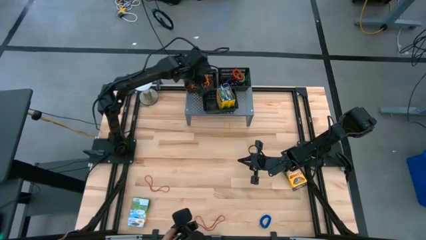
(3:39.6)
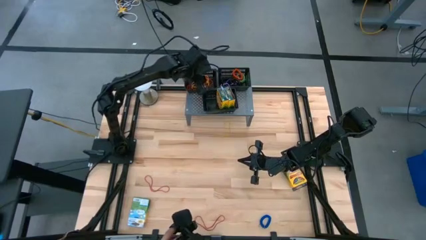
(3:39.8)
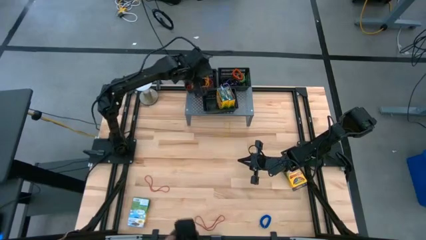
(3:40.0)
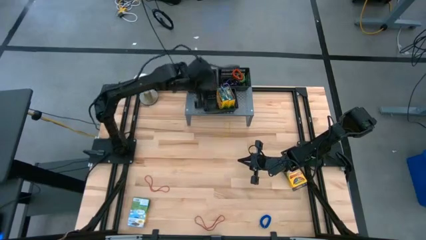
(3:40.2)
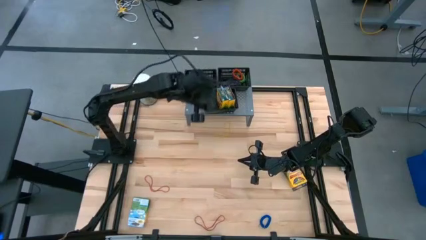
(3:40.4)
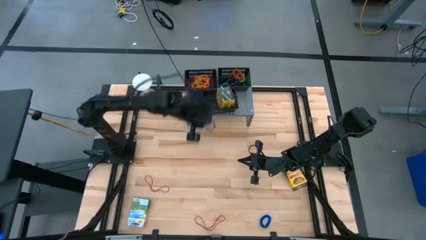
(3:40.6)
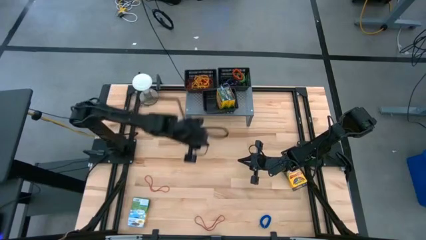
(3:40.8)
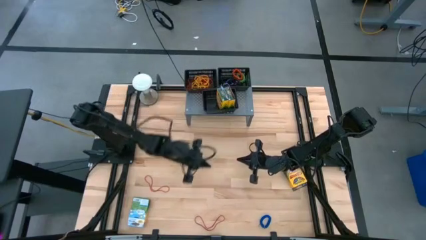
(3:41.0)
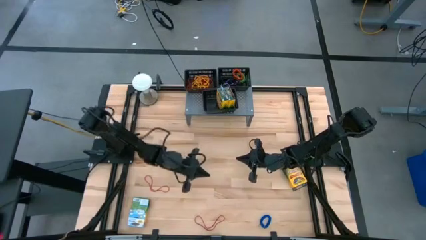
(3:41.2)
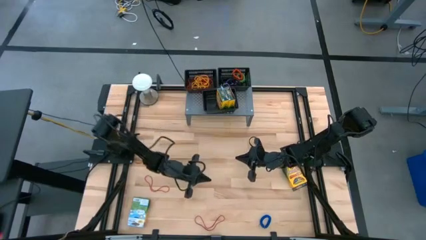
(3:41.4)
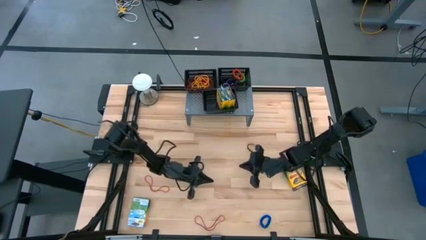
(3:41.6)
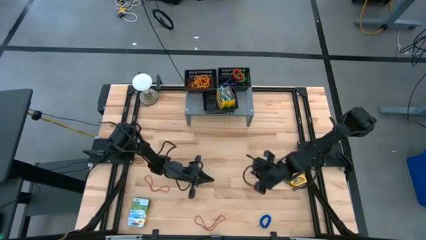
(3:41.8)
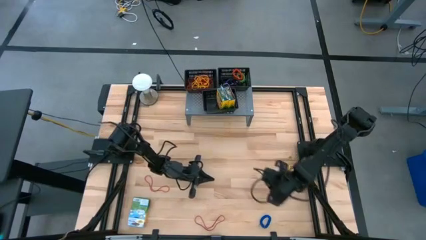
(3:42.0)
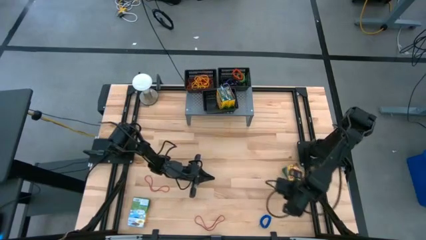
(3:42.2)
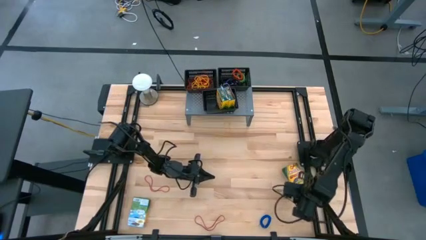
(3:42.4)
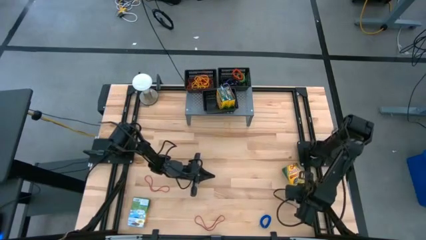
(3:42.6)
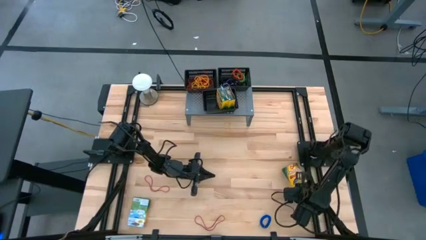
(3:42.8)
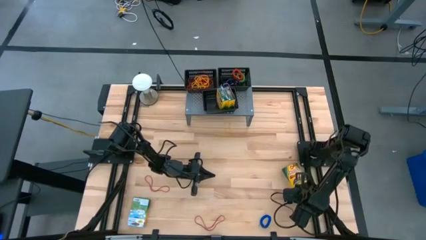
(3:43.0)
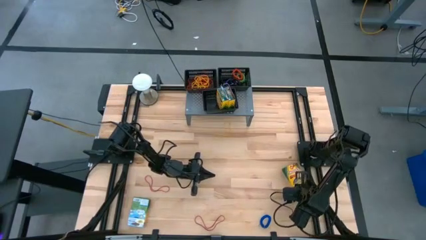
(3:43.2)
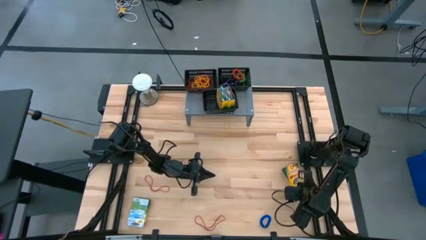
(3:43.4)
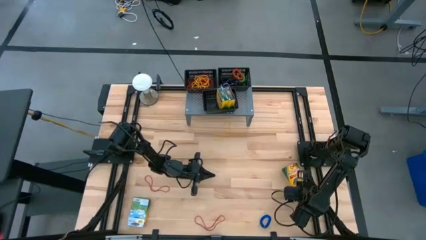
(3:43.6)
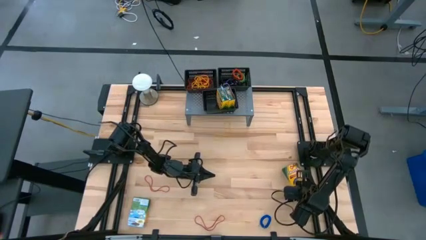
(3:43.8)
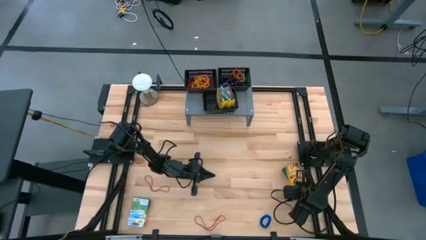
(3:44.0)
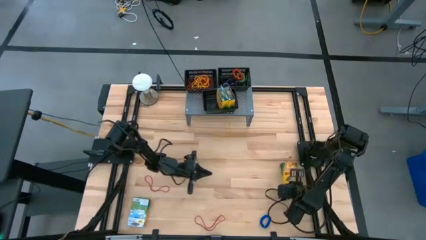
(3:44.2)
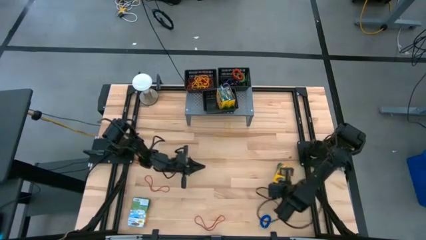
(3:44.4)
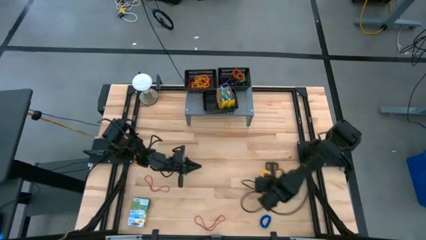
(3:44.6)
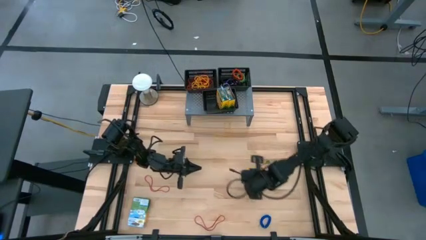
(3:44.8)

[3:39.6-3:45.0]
Task: Pick & Place Office Desk Supplies
Put the crayon box into the bottom black basket on the shelf

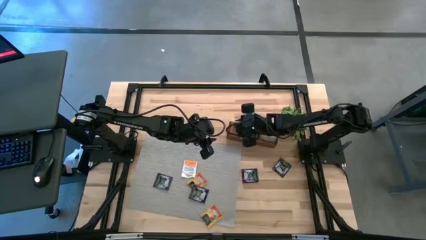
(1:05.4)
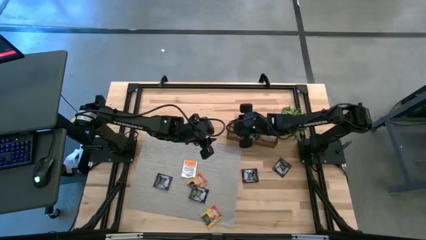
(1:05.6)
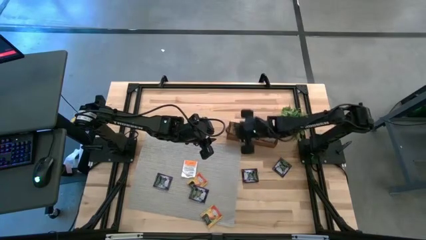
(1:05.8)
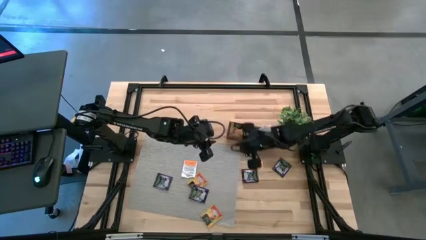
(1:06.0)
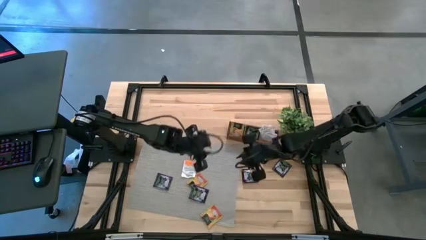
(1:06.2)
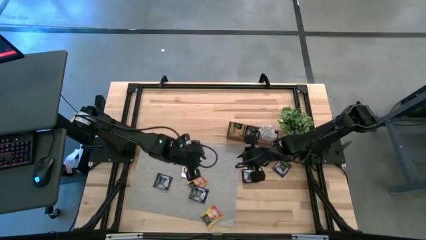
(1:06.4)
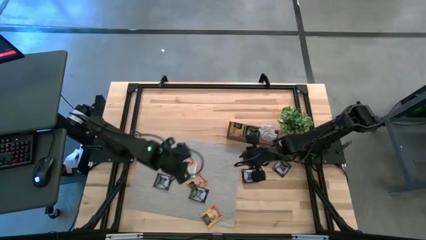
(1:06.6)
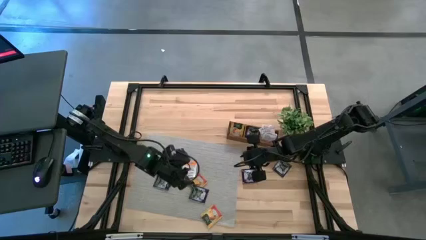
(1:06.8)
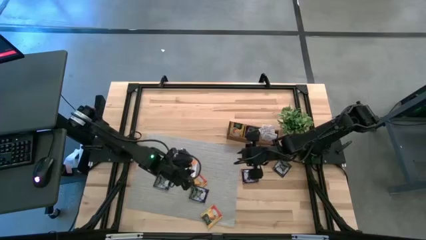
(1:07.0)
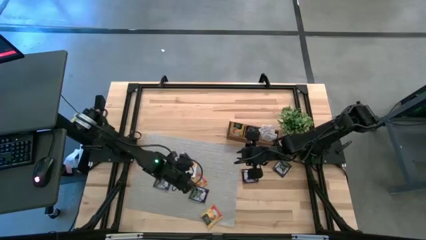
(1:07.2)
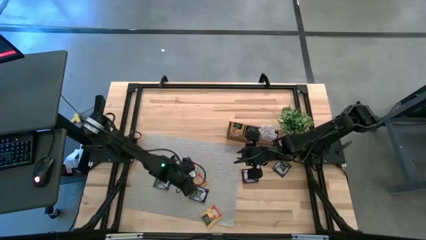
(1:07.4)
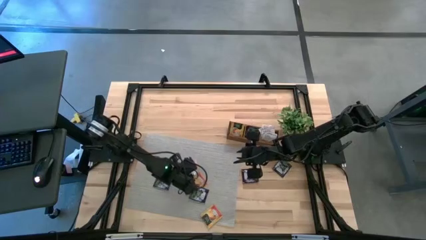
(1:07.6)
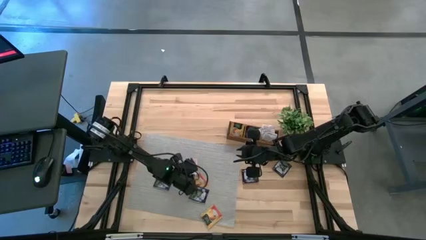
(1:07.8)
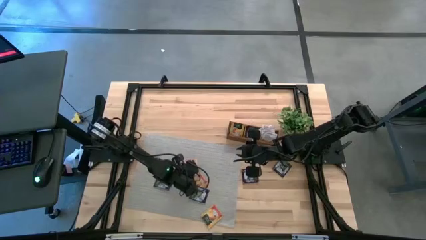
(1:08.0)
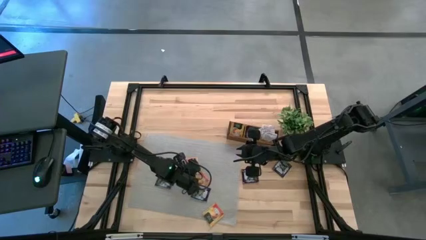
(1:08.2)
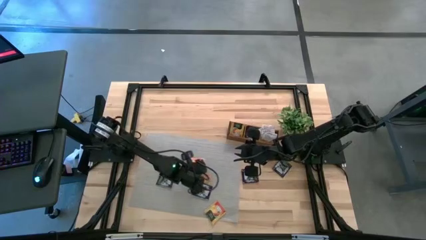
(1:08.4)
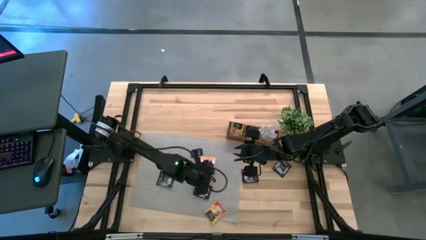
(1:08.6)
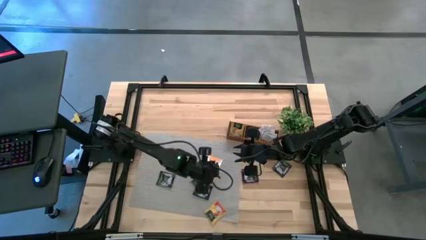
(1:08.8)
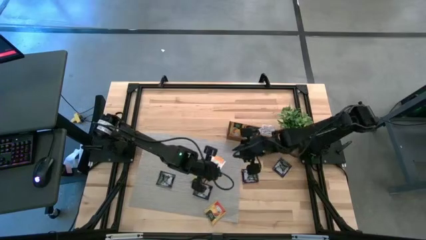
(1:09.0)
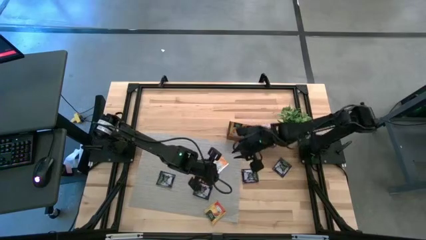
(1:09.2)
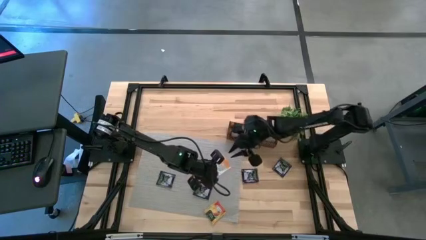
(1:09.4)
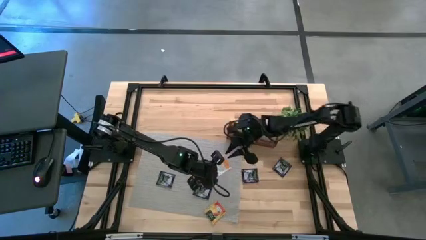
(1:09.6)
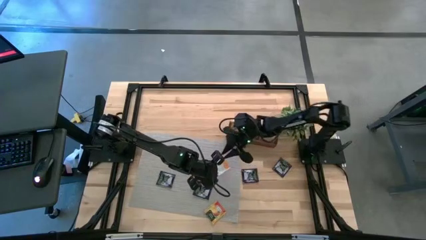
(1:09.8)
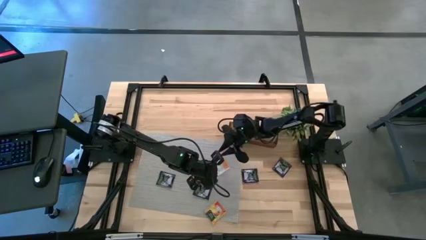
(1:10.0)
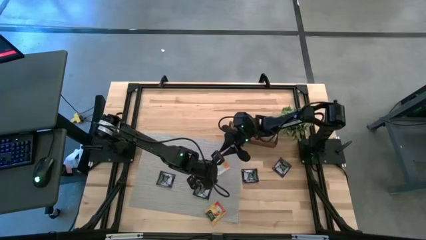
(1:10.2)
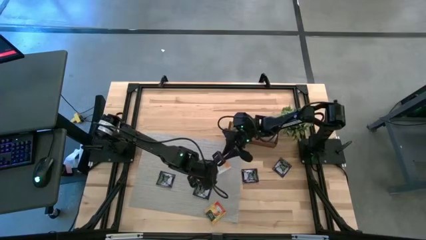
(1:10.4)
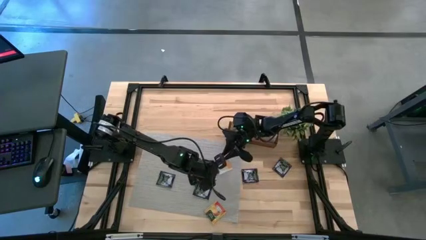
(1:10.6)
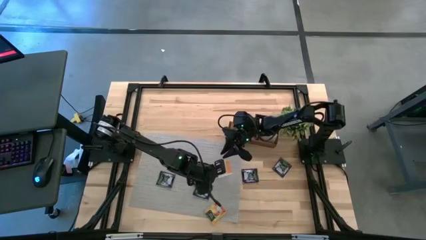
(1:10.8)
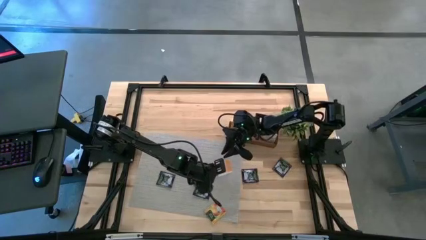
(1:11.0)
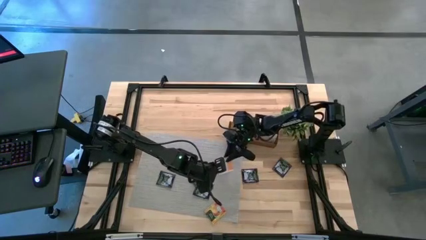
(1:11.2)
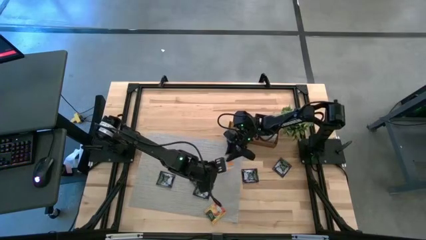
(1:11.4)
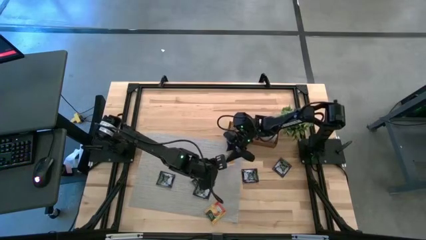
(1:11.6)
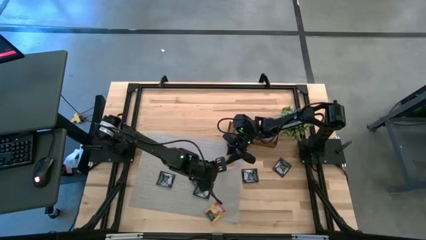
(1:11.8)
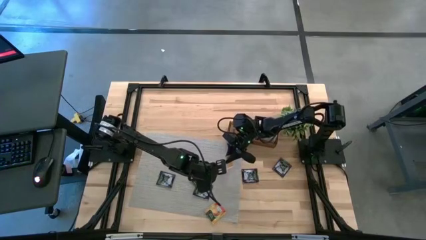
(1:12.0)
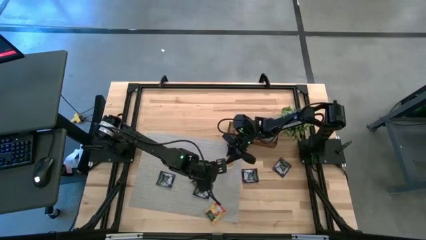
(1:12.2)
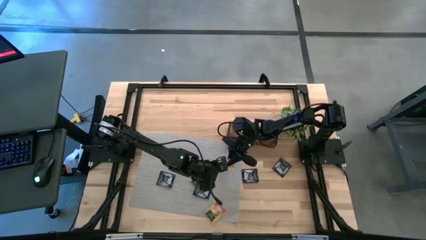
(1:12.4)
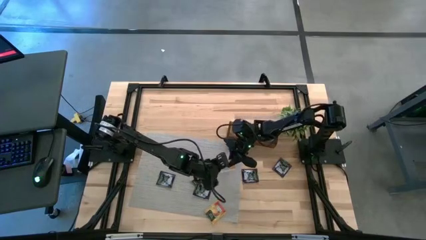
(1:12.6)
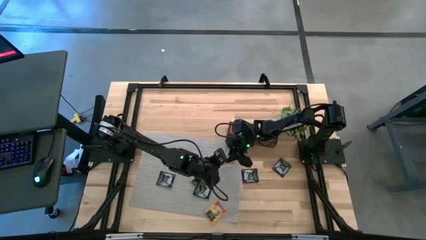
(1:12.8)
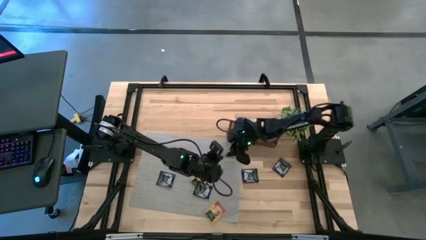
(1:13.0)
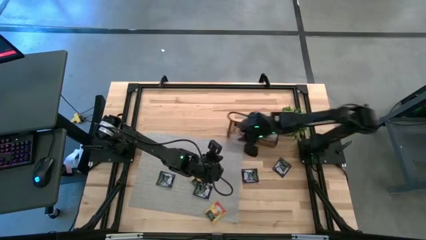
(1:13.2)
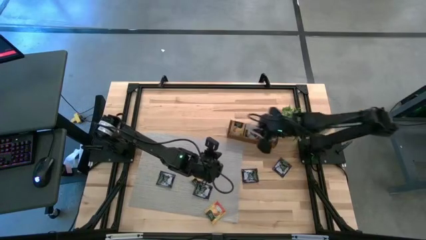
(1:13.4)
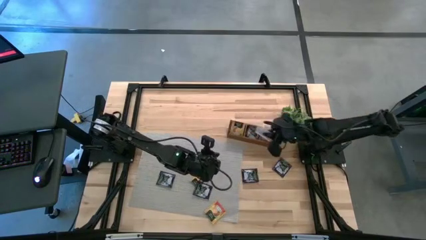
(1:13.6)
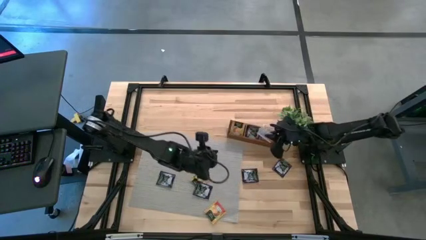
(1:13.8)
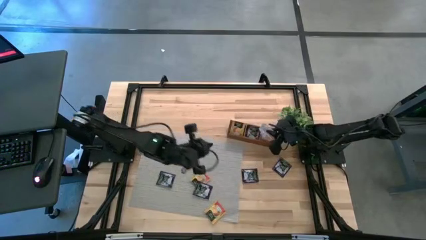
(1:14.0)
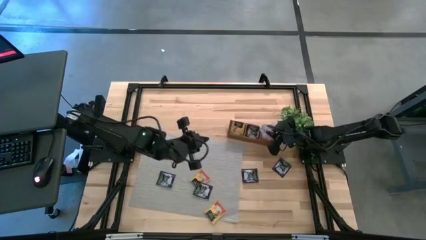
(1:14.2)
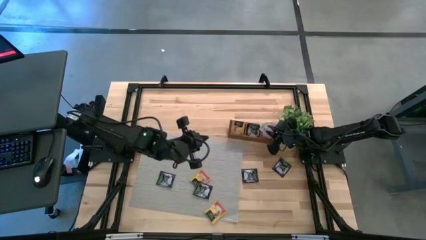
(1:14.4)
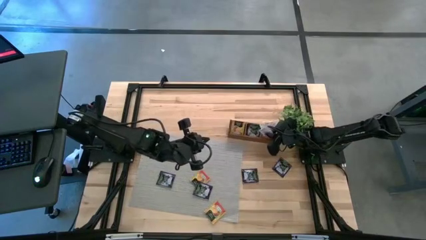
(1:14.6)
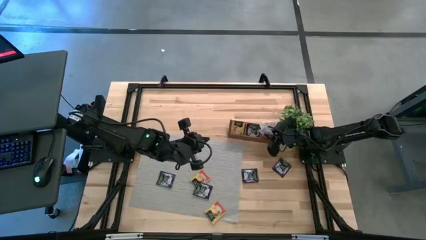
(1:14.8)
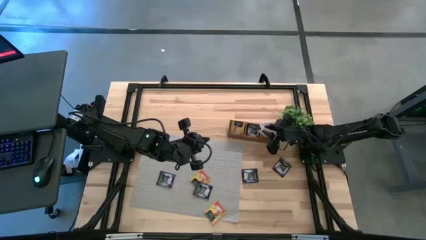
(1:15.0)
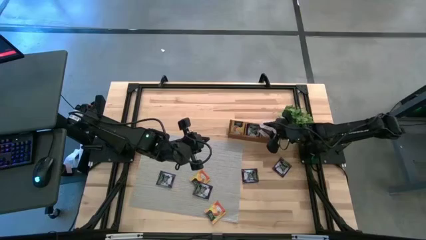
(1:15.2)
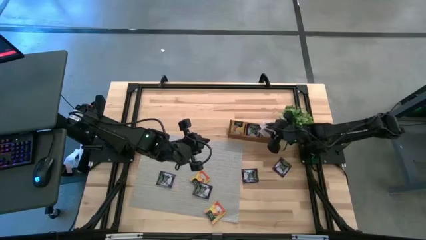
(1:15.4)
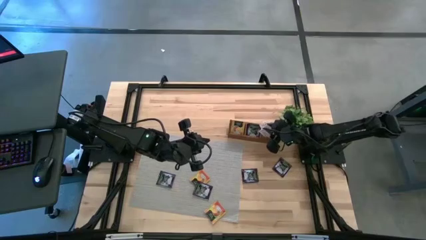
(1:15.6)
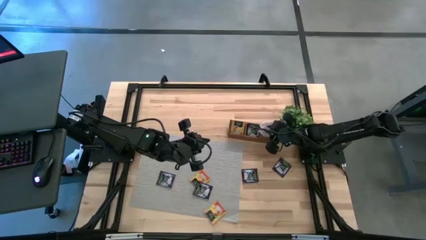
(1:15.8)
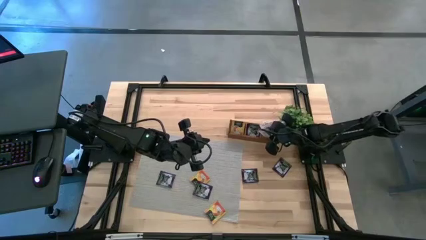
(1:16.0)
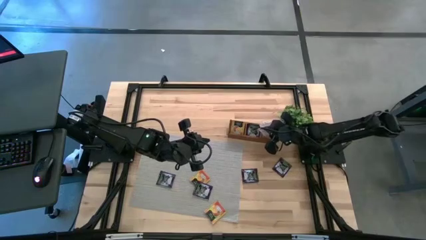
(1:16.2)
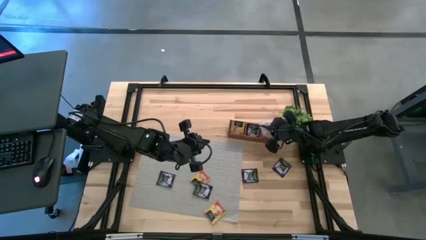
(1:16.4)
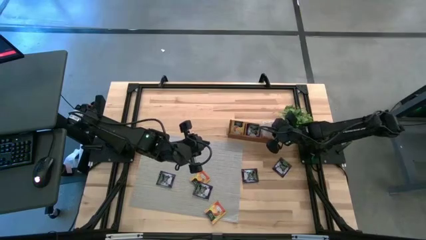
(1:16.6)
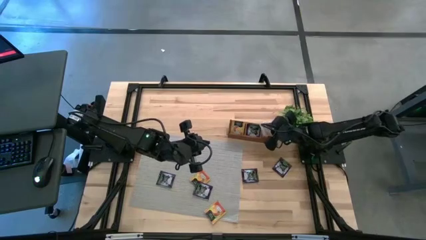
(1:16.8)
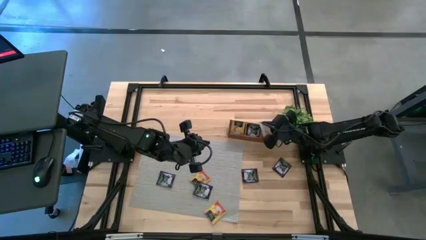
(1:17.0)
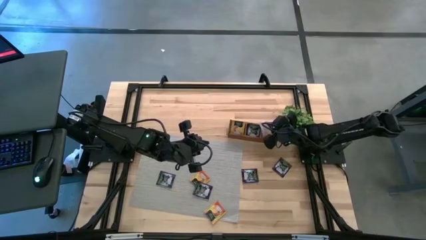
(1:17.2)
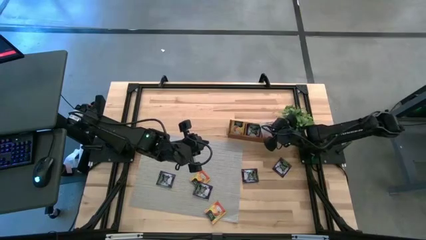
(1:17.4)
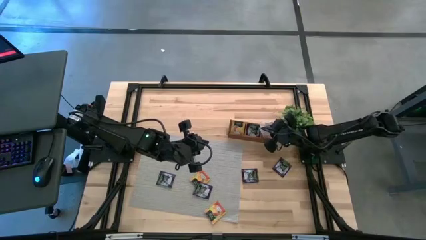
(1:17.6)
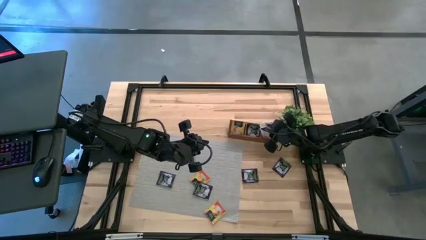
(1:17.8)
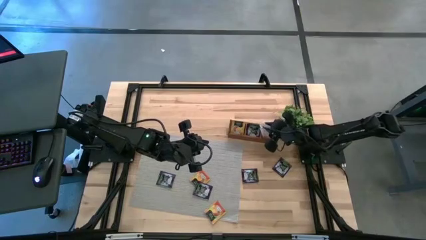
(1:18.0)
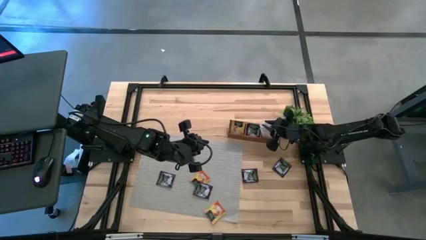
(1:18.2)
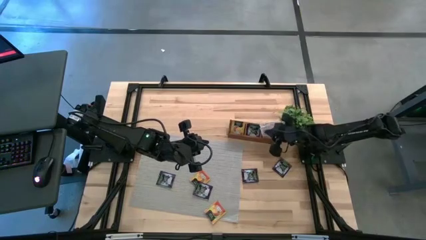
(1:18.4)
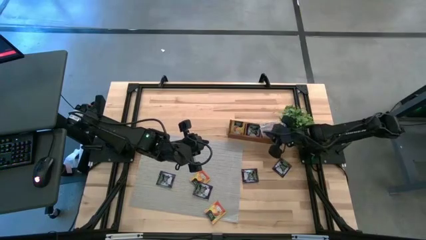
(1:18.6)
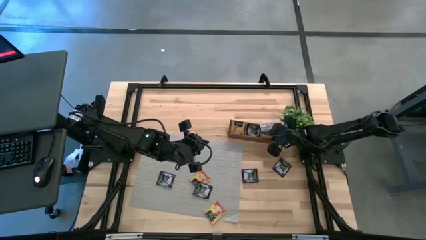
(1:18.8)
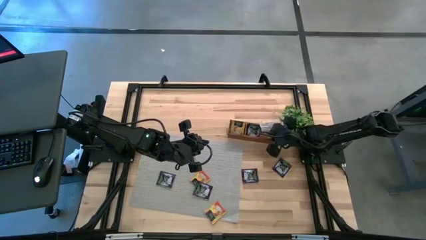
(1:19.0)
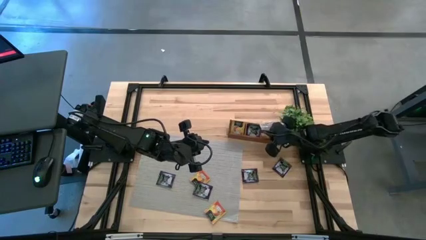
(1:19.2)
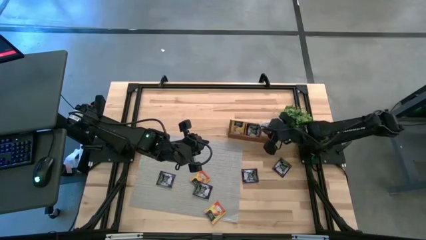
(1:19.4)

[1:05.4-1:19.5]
Task: Pick & Place Tea
Put the white orange tea bag in the right section of the wooden organizer
